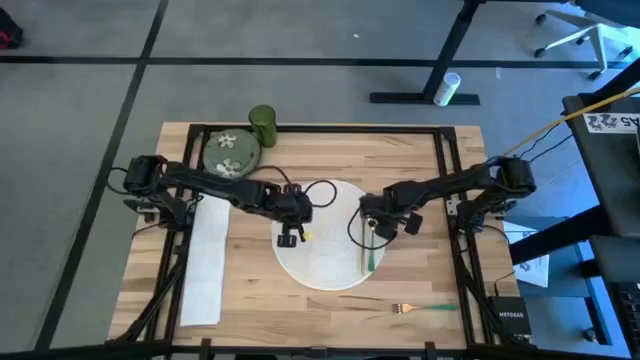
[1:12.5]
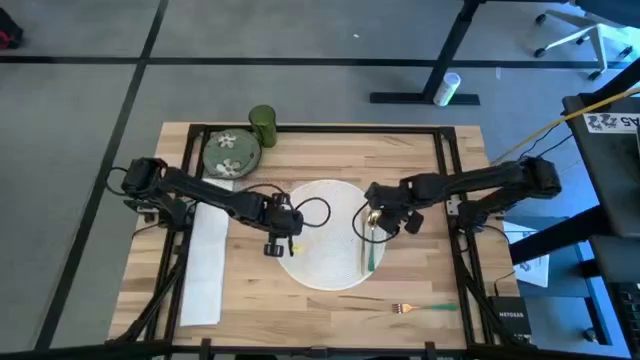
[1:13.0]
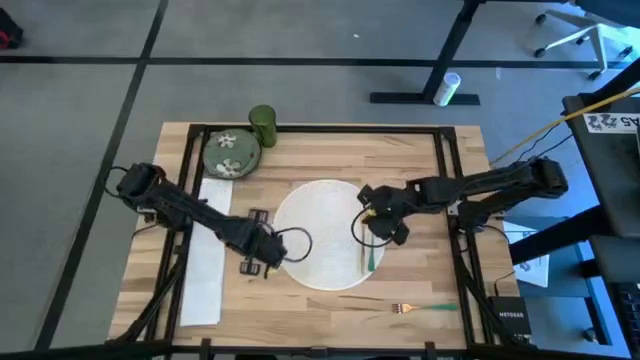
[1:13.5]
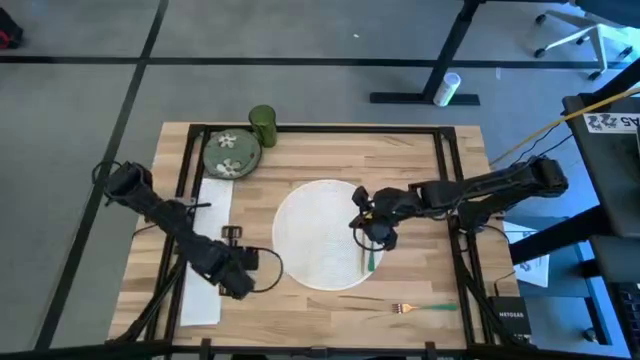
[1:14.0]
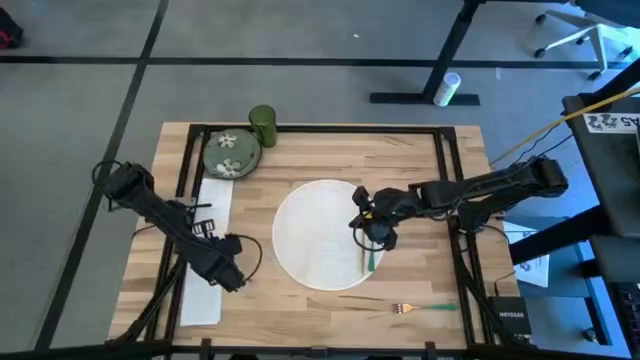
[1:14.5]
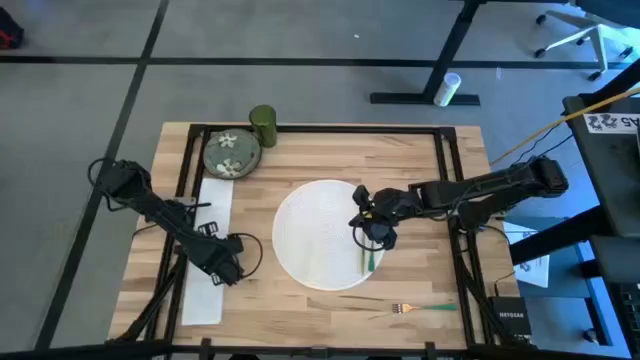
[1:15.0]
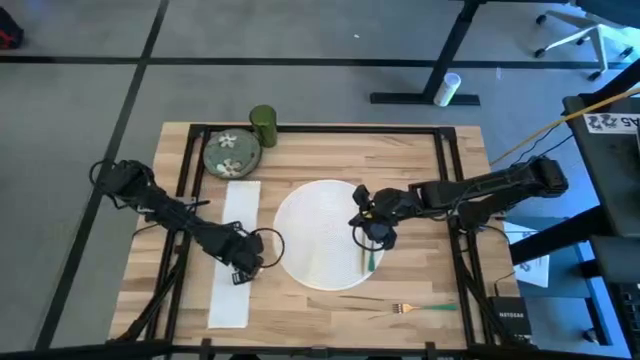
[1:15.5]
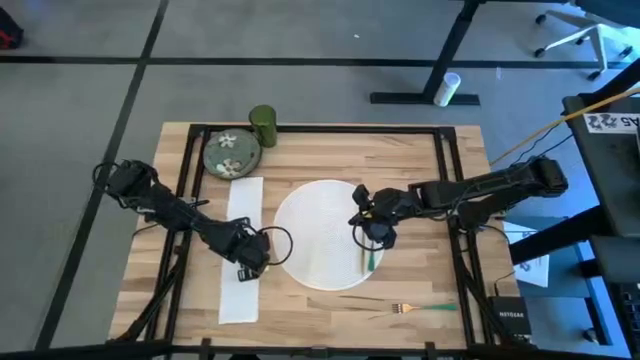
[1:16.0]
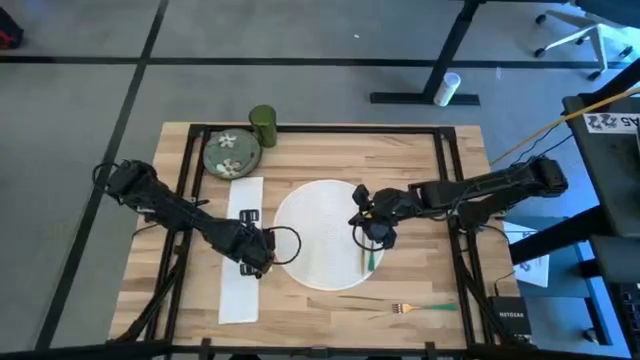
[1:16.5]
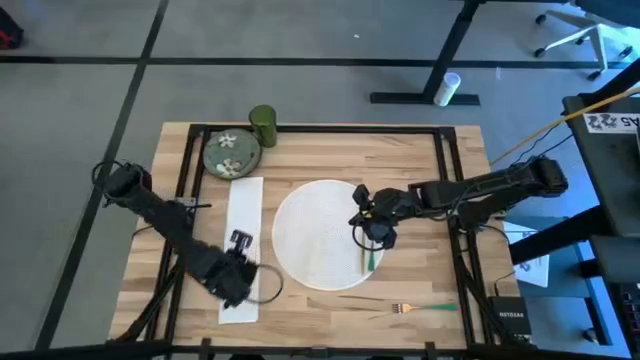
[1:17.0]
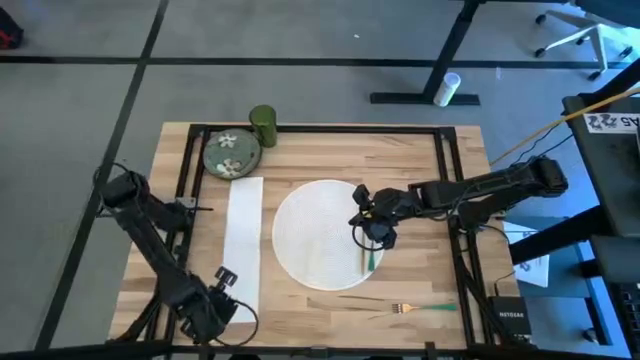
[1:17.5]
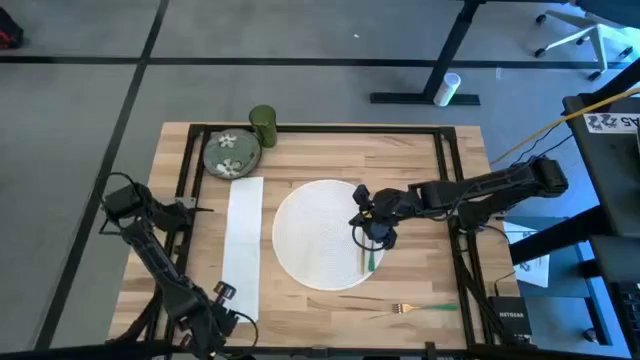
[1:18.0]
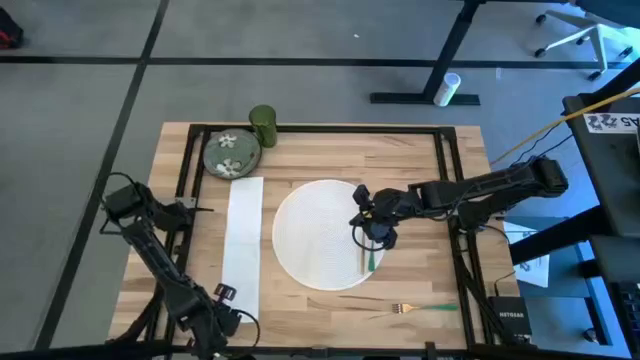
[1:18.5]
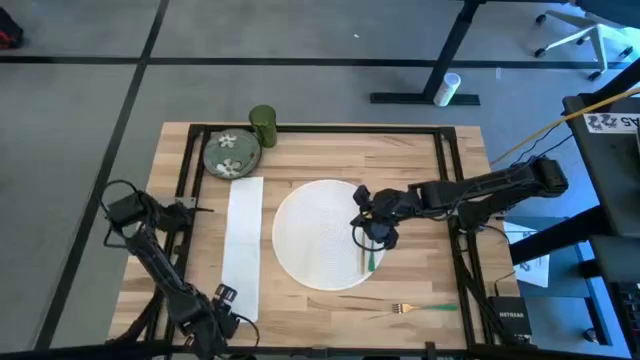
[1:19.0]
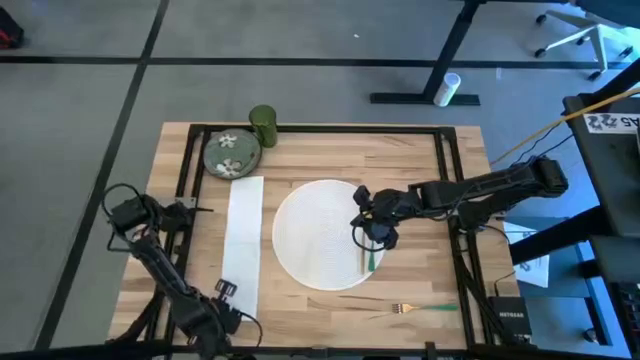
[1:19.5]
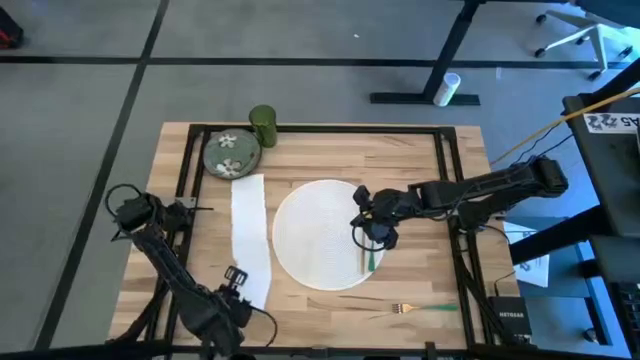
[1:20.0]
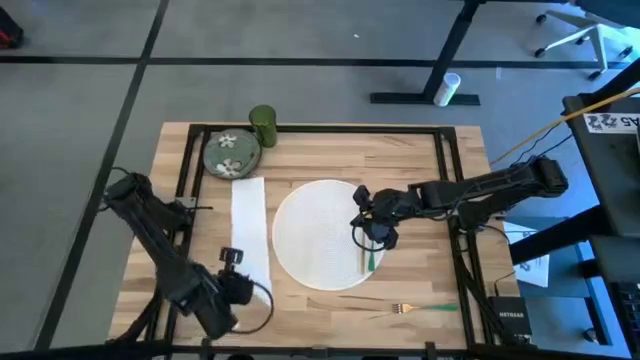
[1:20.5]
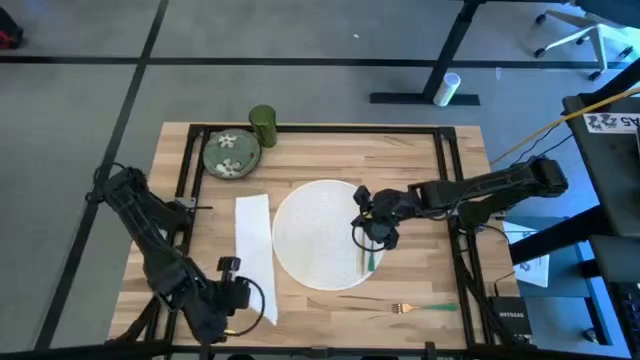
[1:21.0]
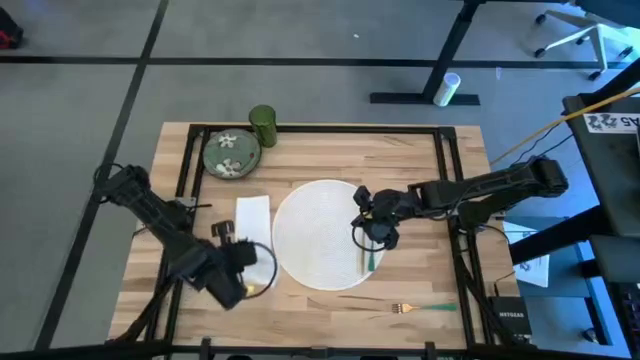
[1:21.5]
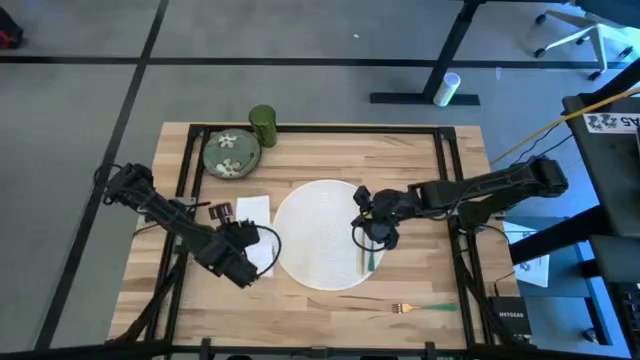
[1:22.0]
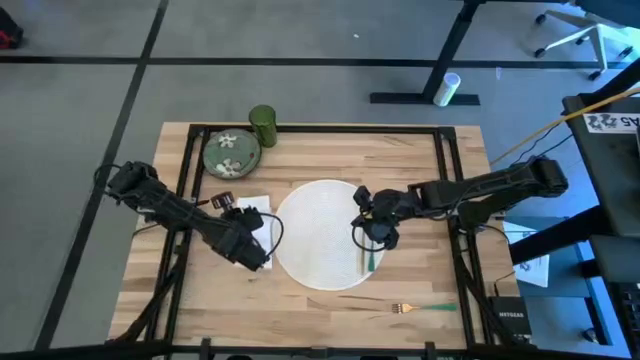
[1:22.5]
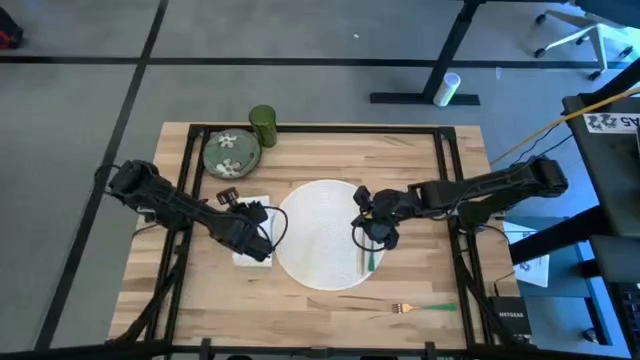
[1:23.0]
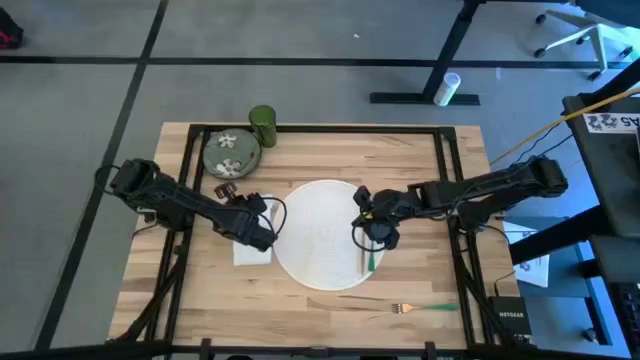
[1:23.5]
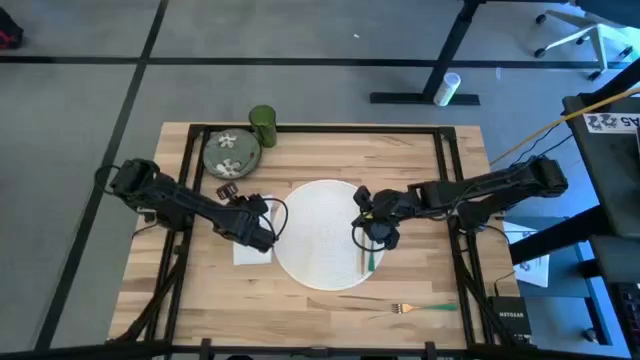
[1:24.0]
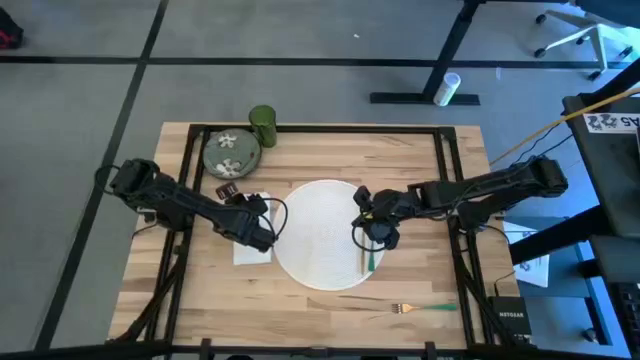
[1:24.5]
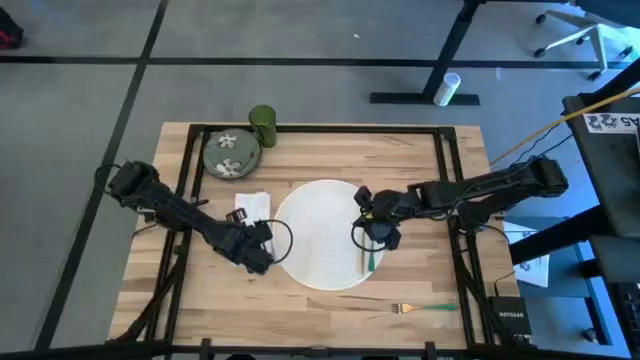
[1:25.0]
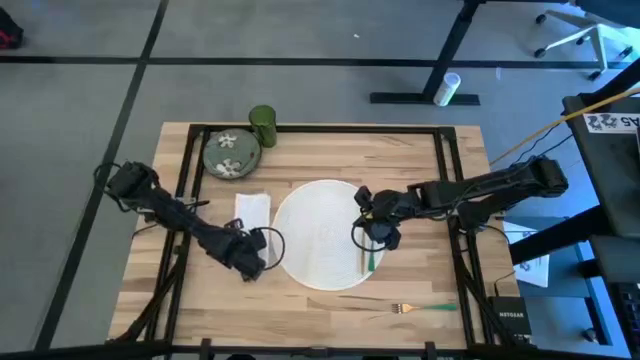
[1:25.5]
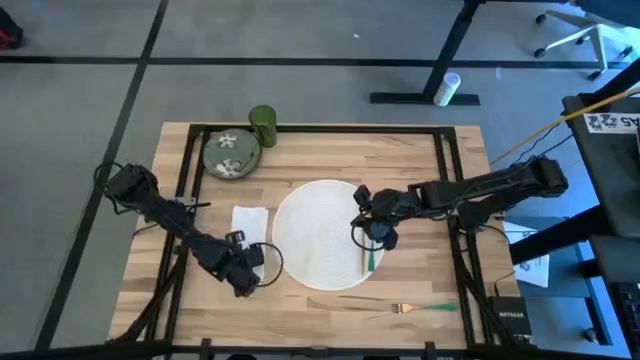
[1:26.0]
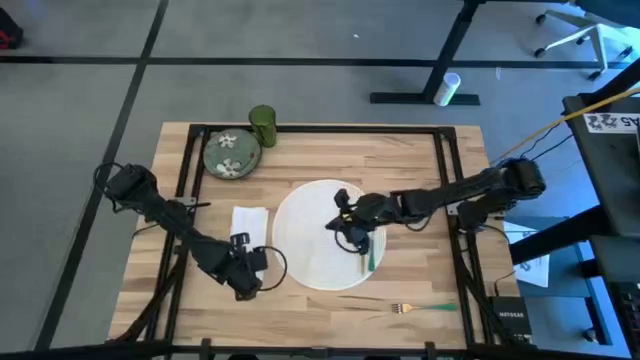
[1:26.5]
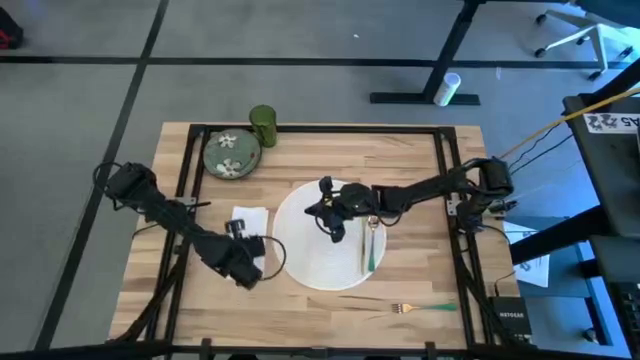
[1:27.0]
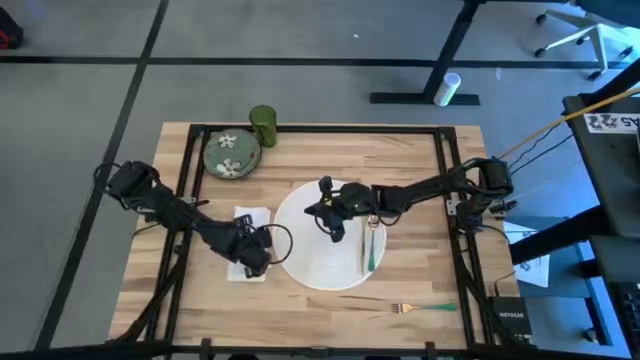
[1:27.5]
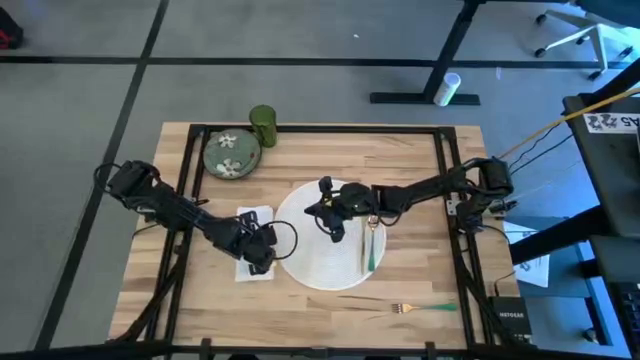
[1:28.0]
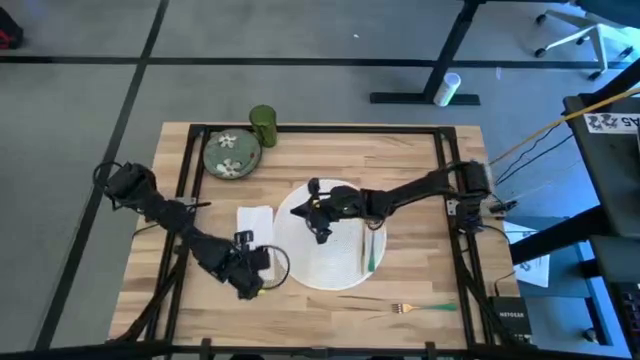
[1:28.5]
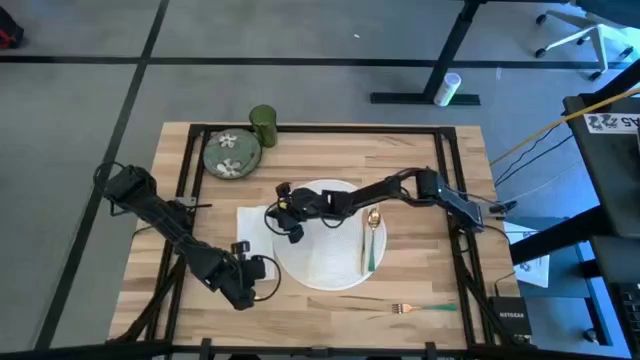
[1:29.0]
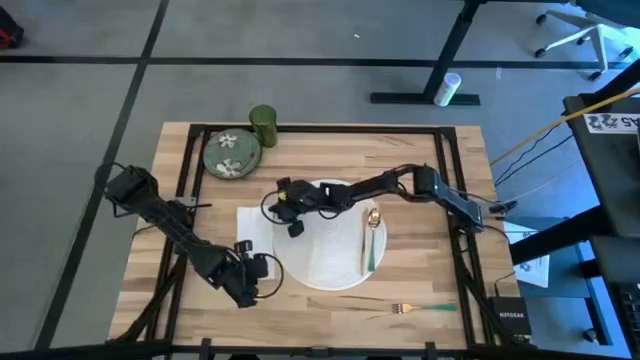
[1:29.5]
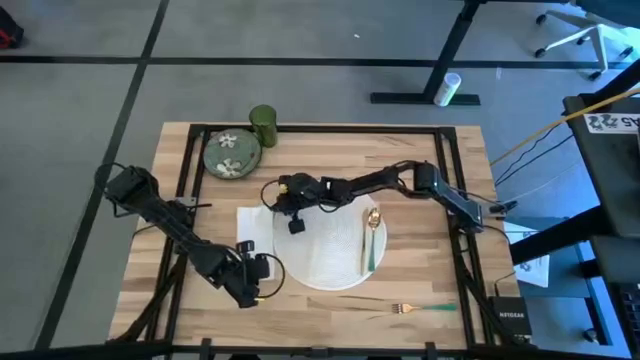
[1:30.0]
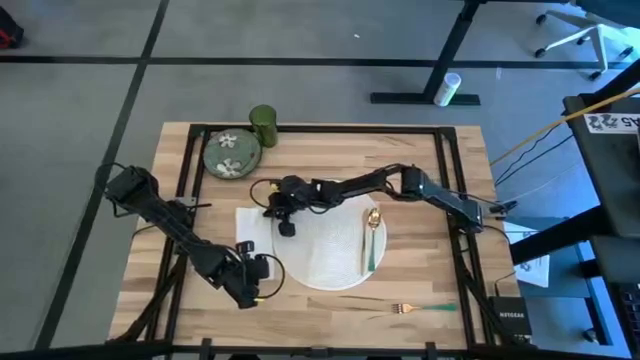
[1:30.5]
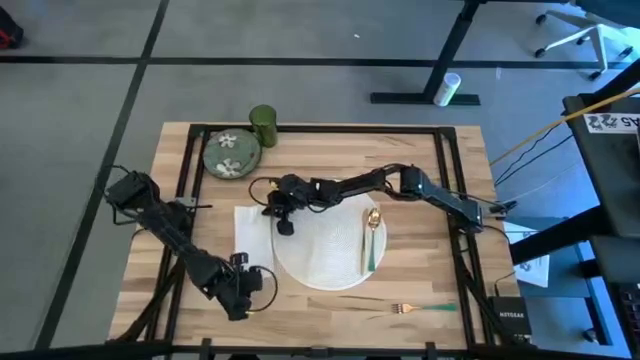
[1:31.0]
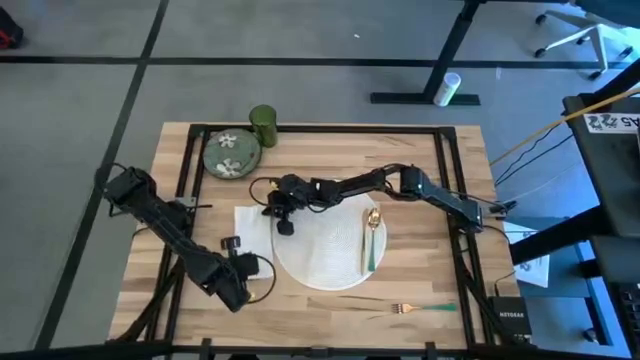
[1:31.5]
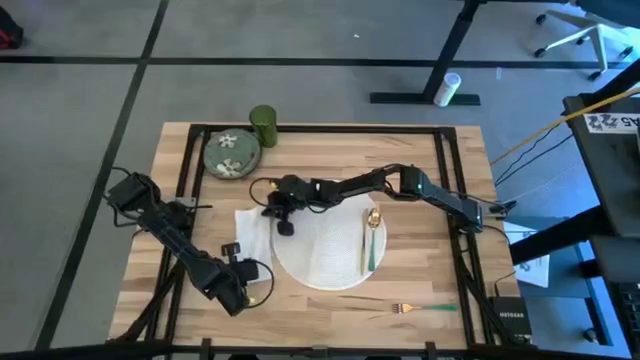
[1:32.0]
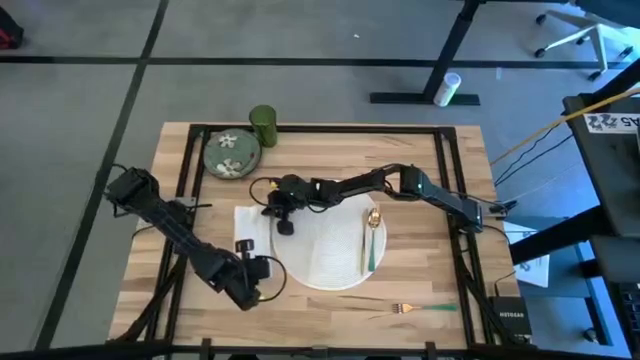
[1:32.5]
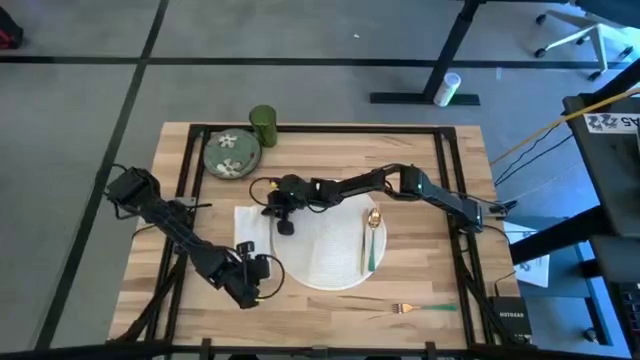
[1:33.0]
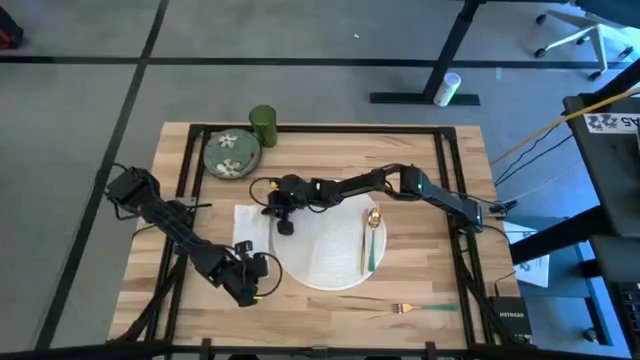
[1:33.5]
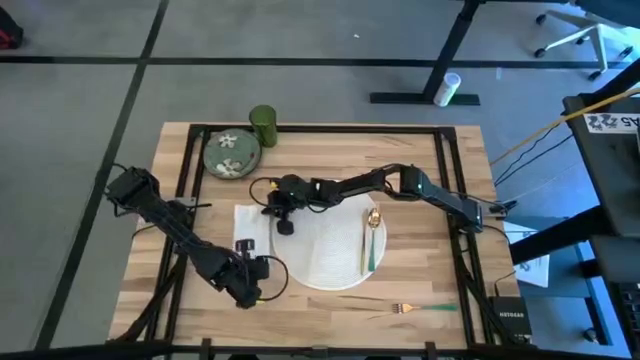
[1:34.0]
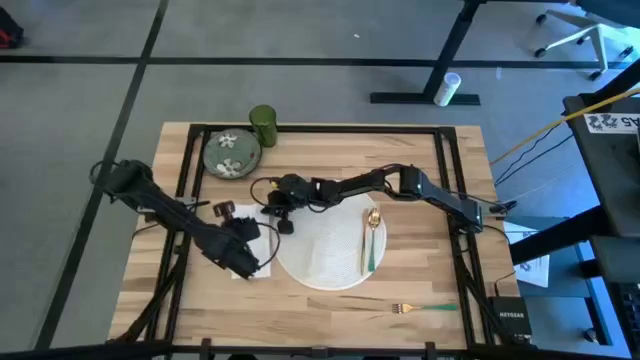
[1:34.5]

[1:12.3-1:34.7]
Task: Set table place
Fold the white table napkin
